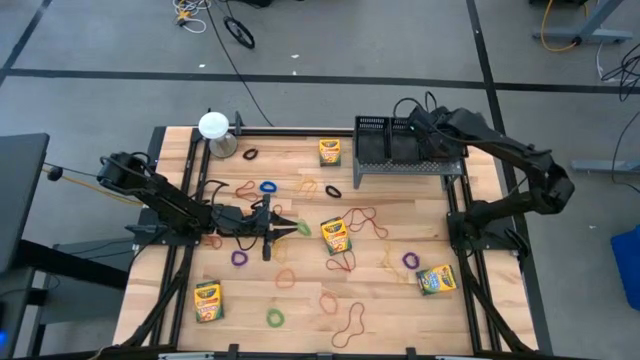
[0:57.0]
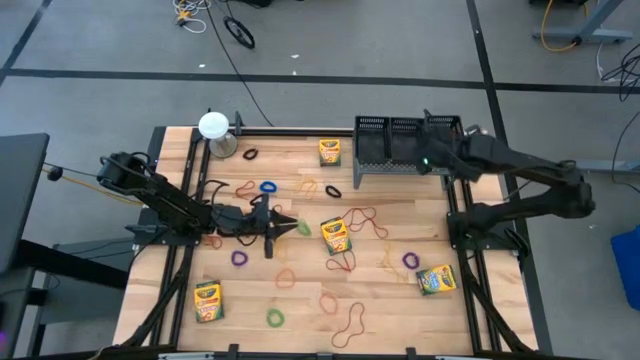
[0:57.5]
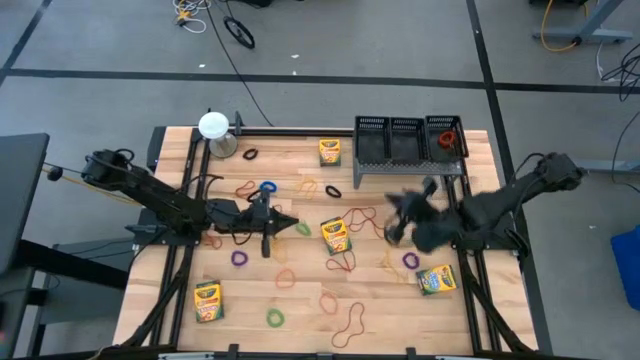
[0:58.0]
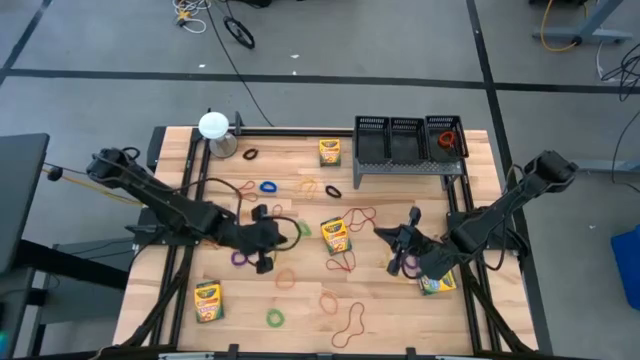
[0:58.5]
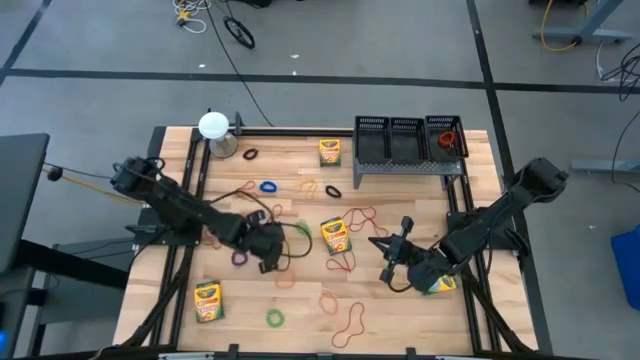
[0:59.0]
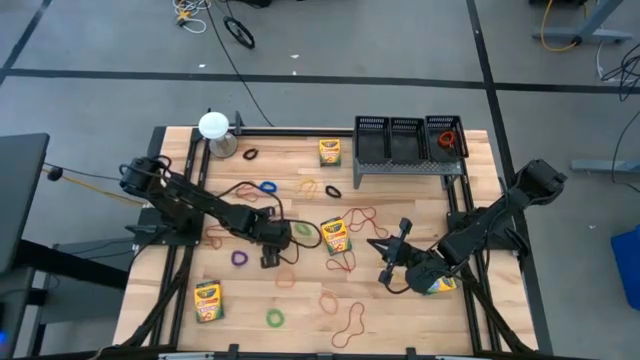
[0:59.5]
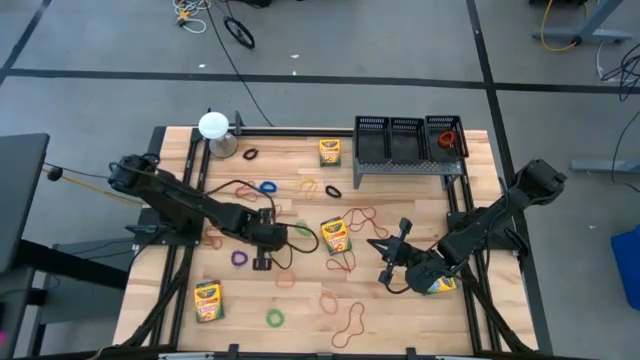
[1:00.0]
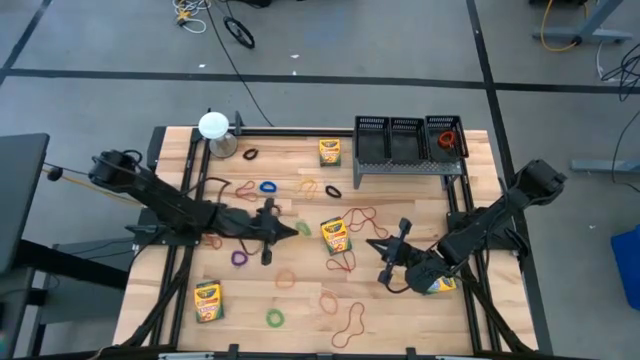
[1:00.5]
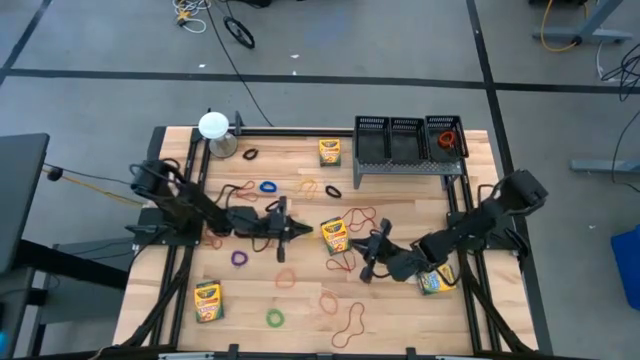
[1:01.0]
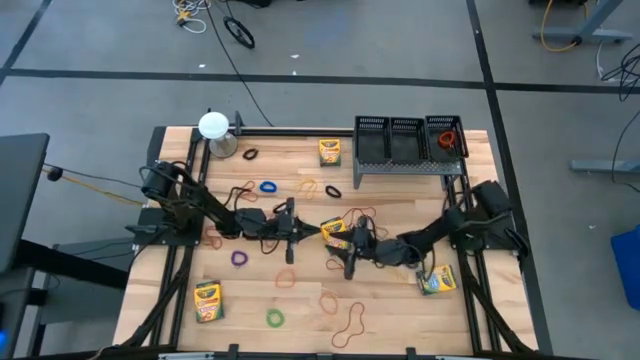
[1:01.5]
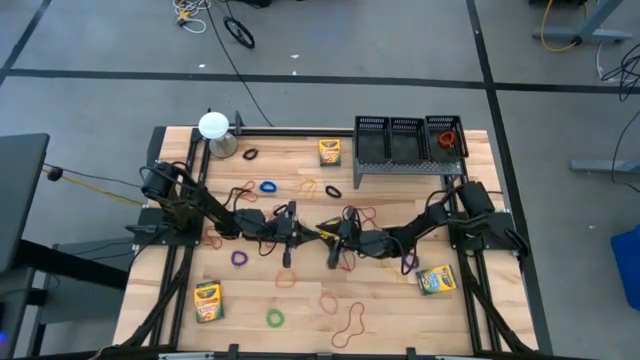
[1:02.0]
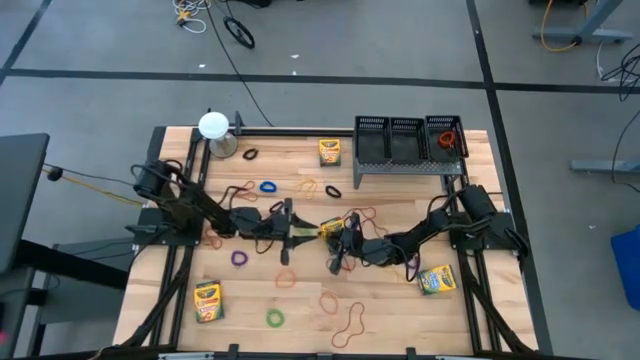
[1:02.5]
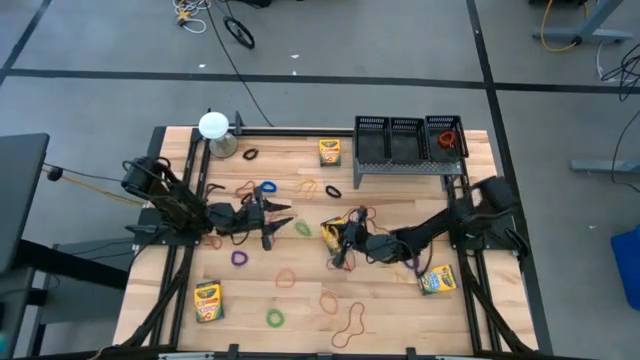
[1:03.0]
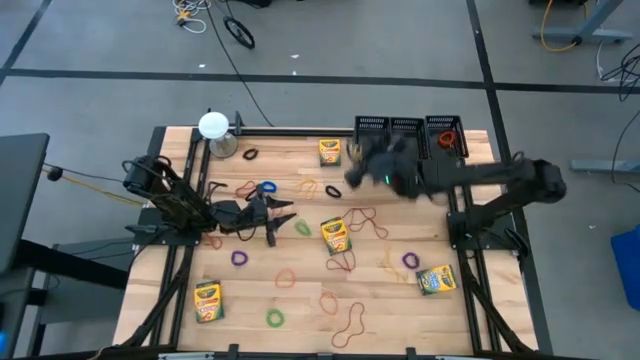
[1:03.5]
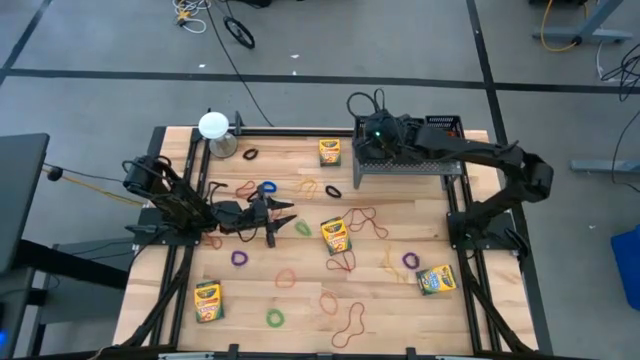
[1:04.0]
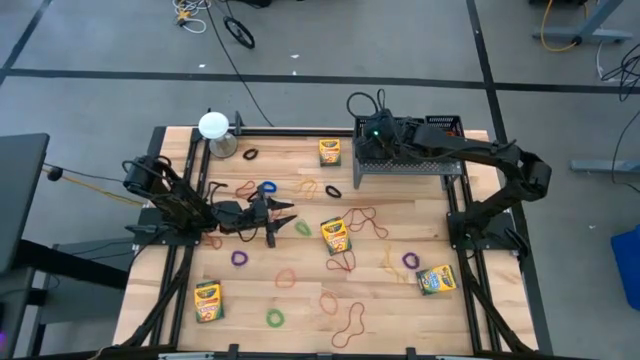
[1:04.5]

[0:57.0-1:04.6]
Task: Pick & Place Office Desk Supplies
Put the yellow rubber band into the left black bin on the shelf

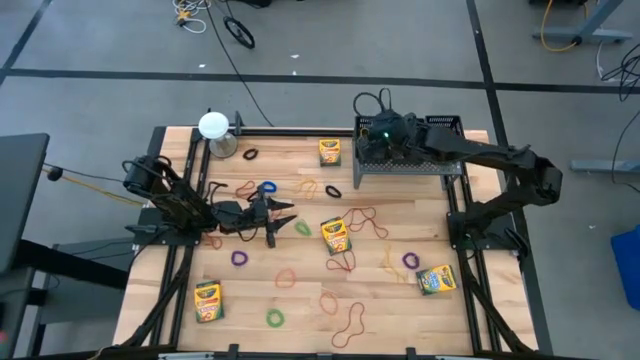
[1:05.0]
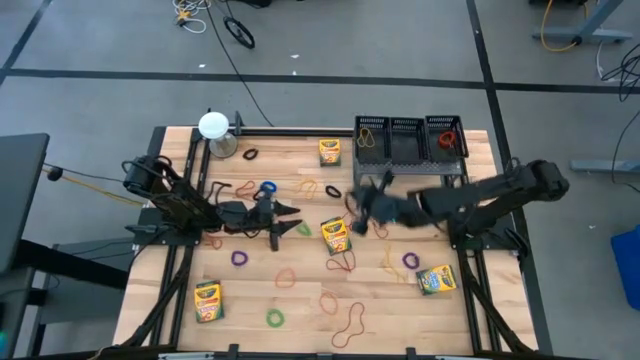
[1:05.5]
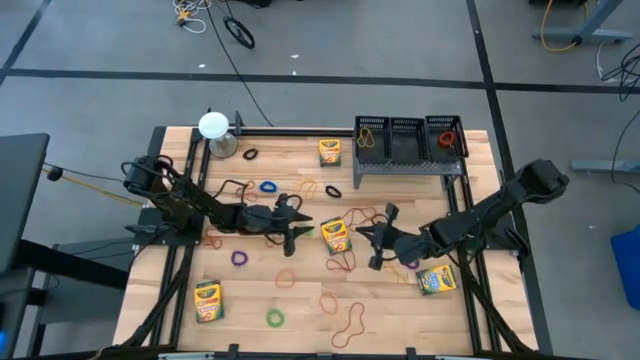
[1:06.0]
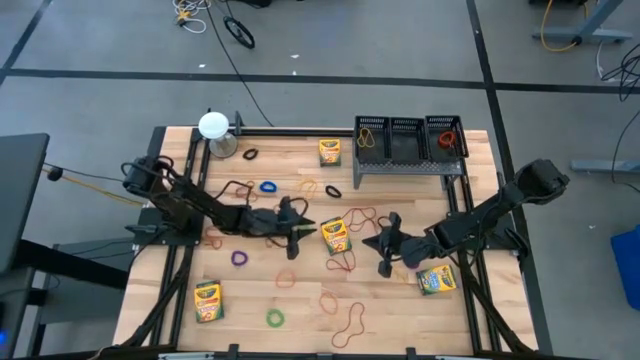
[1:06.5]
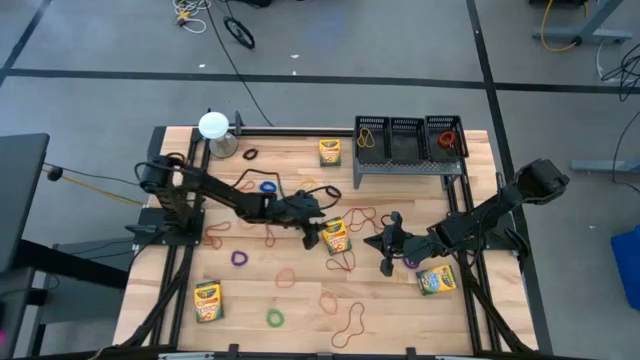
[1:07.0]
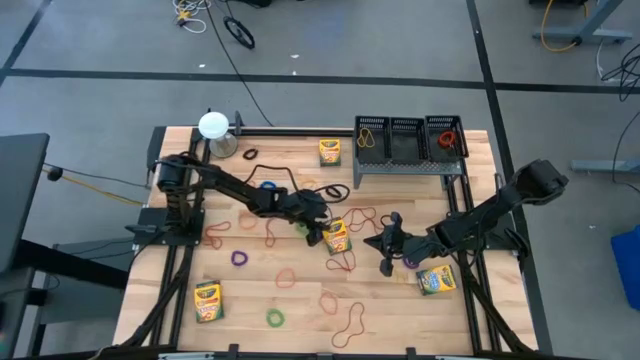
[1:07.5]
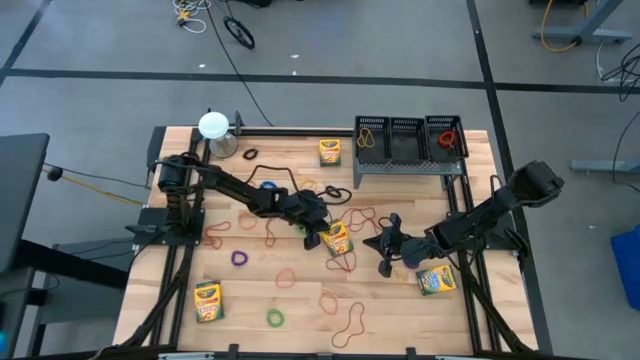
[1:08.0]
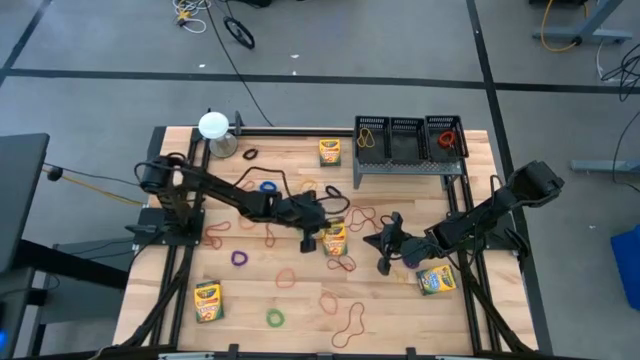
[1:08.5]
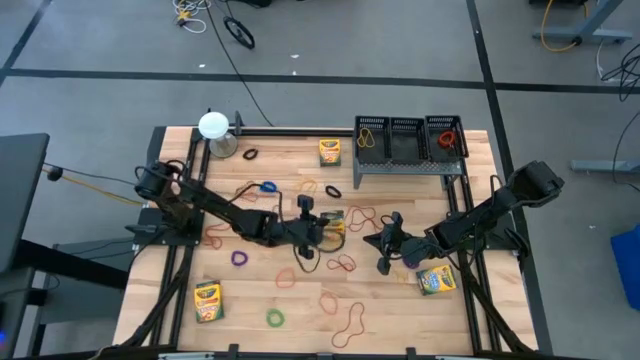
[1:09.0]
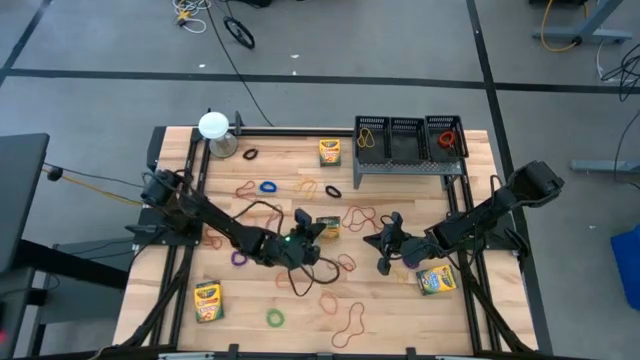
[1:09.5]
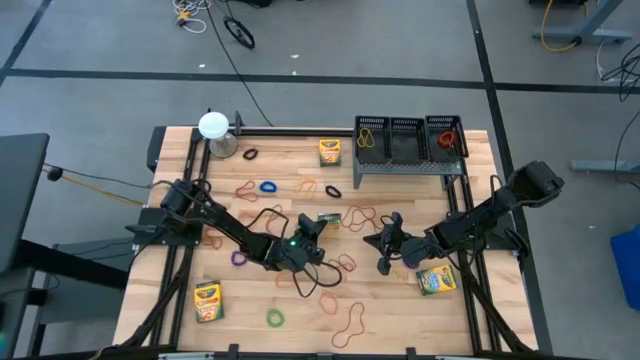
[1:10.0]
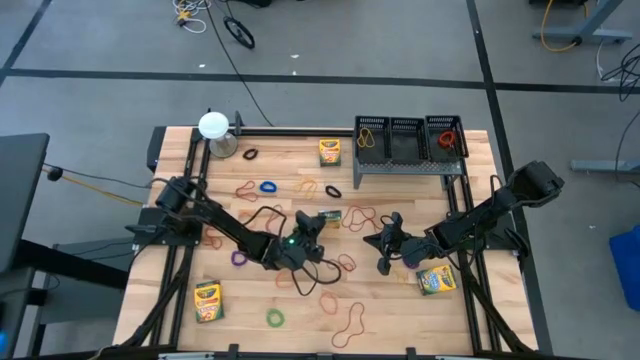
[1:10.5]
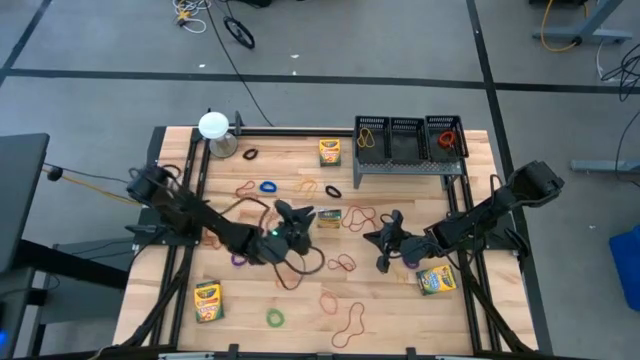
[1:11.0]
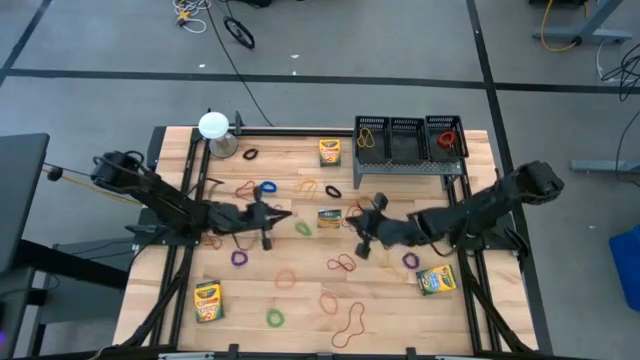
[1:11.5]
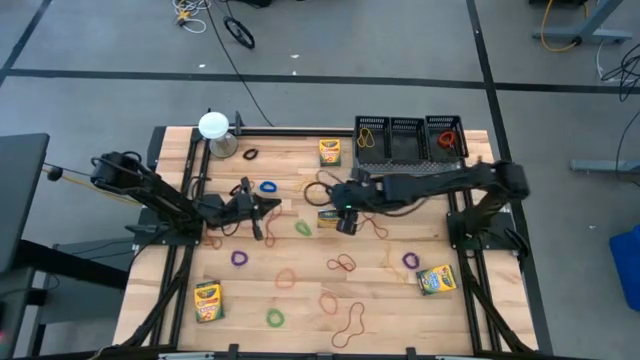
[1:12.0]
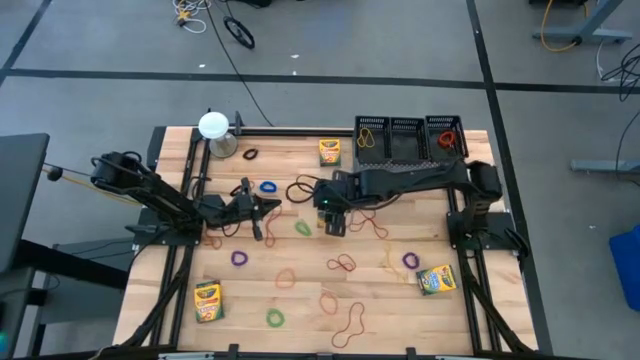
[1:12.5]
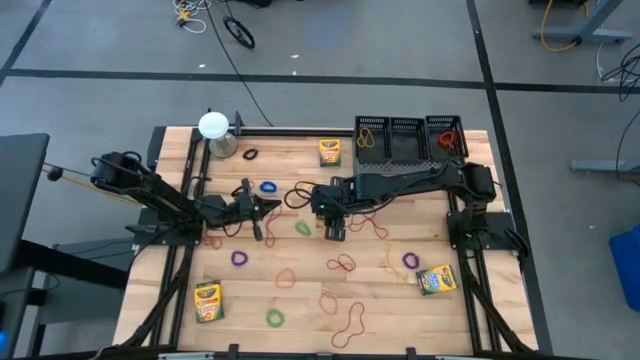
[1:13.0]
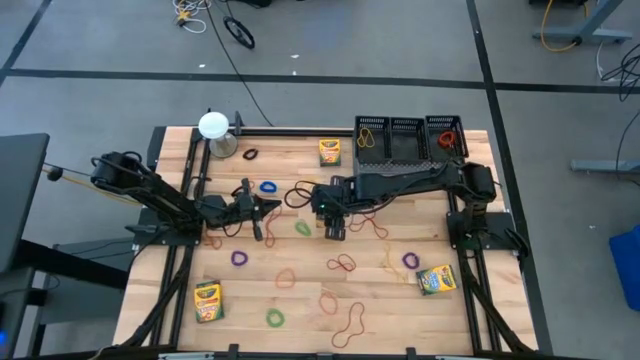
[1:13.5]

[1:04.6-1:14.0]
Put the yellow crayon box into the middle black bin on the shelf

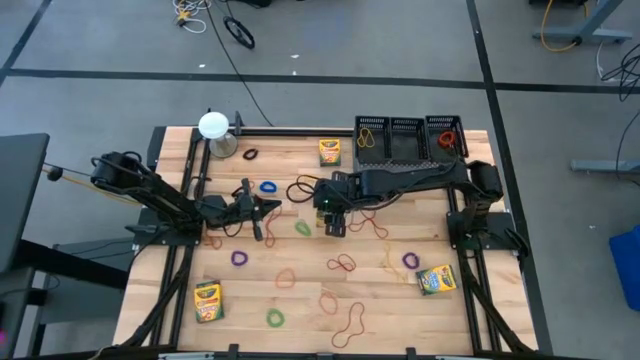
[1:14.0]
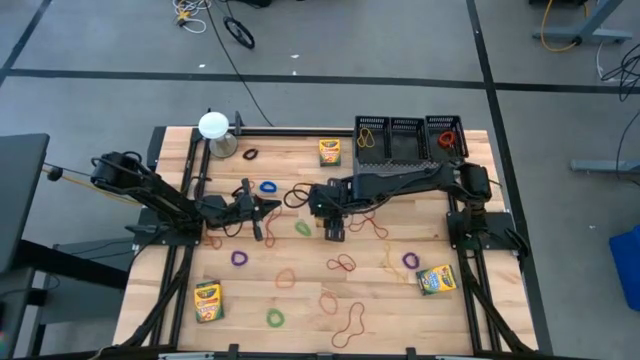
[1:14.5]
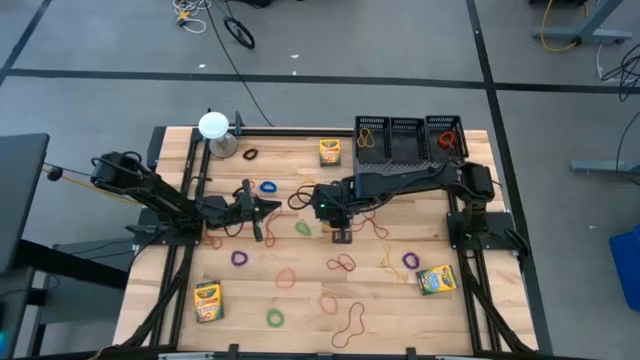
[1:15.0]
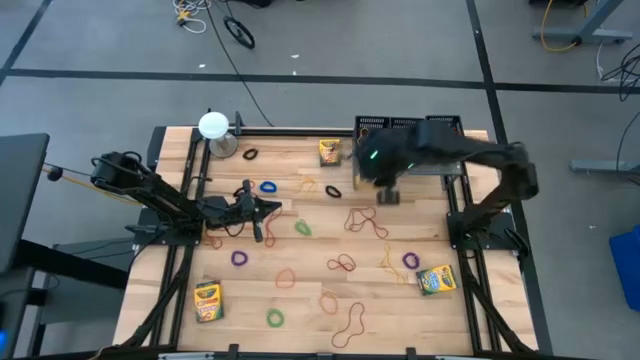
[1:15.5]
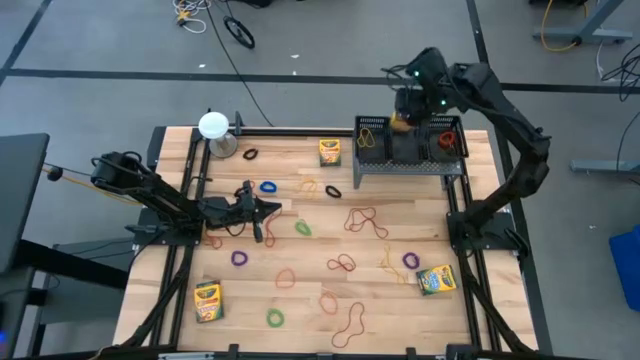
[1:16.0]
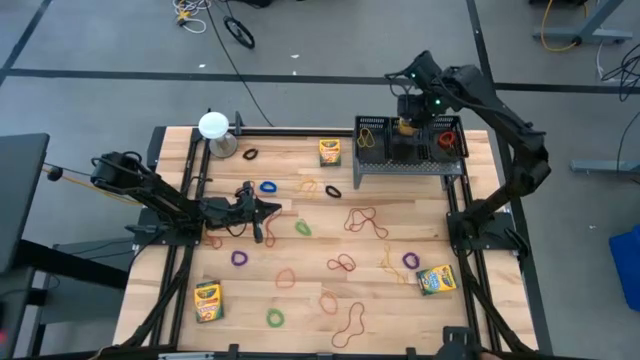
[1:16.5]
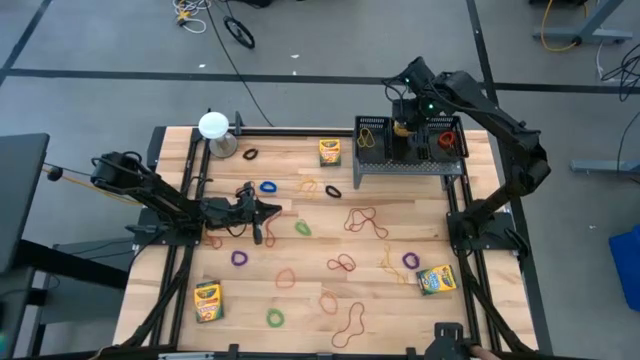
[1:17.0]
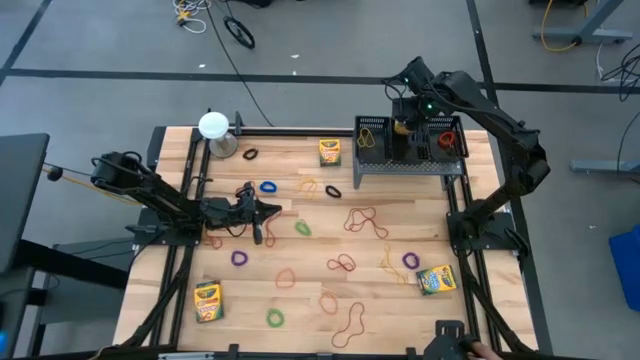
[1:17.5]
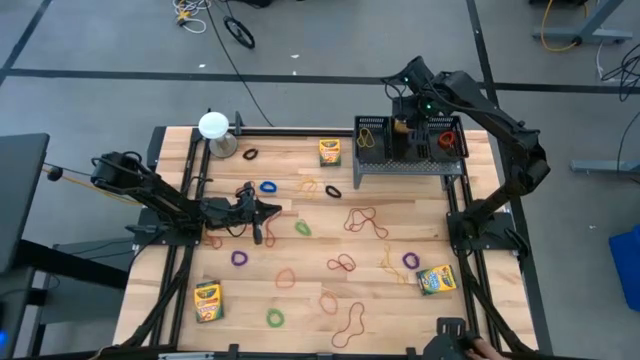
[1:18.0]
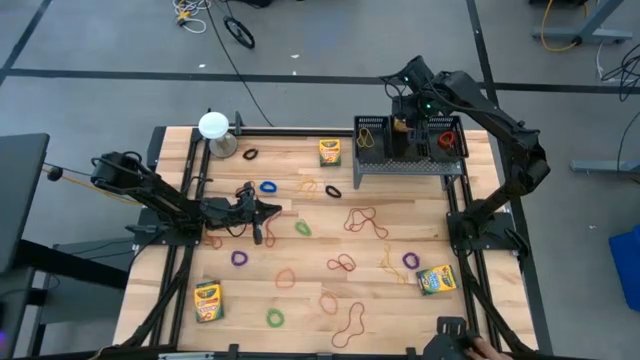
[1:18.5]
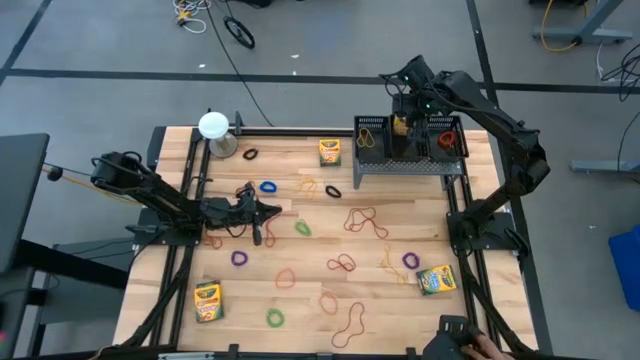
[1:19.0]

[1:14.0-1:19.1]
Put the yellow crayon box into the middle black bin on the shelf
